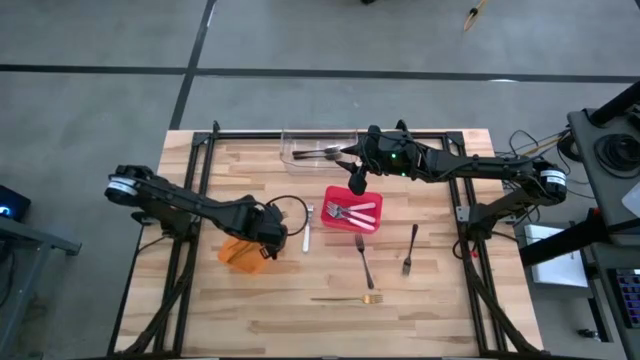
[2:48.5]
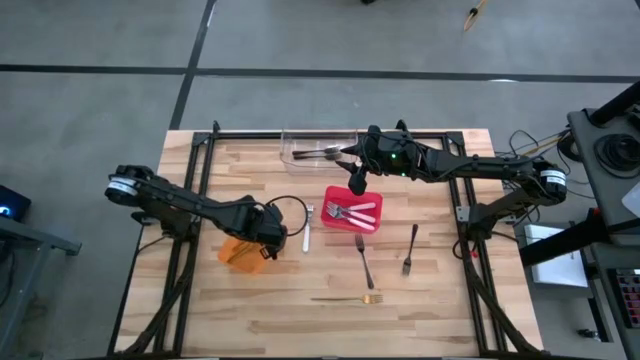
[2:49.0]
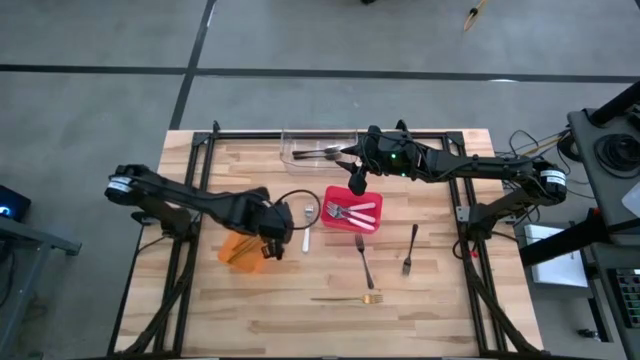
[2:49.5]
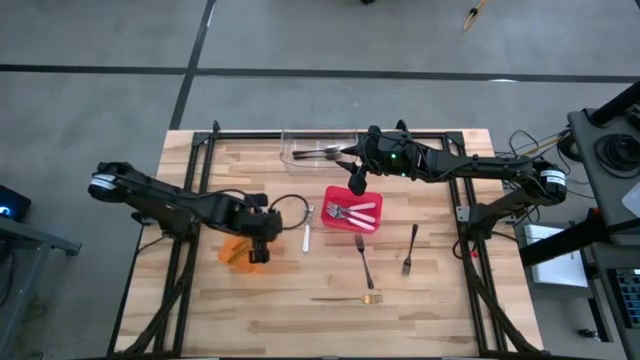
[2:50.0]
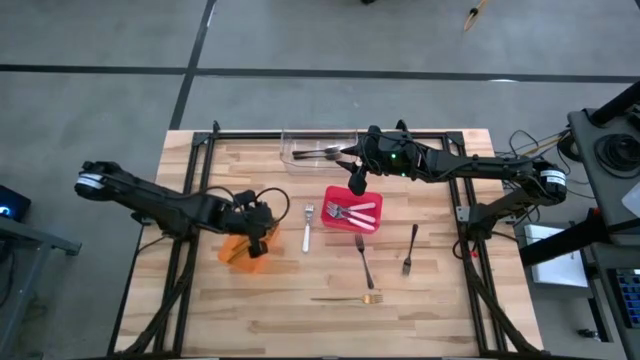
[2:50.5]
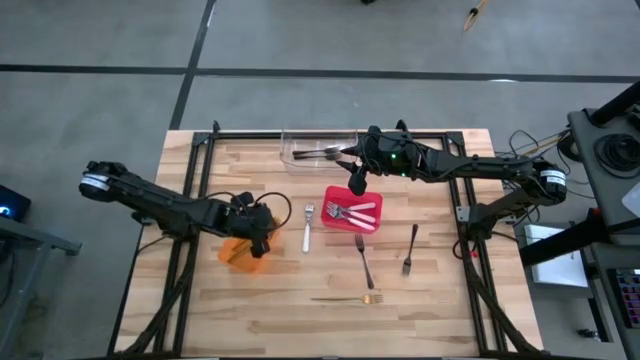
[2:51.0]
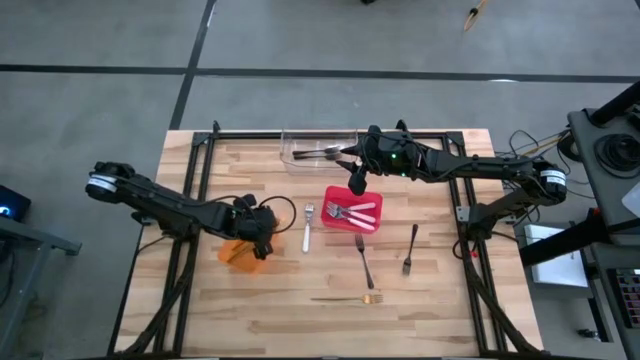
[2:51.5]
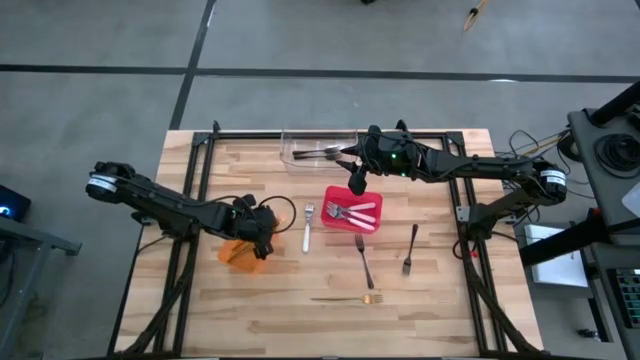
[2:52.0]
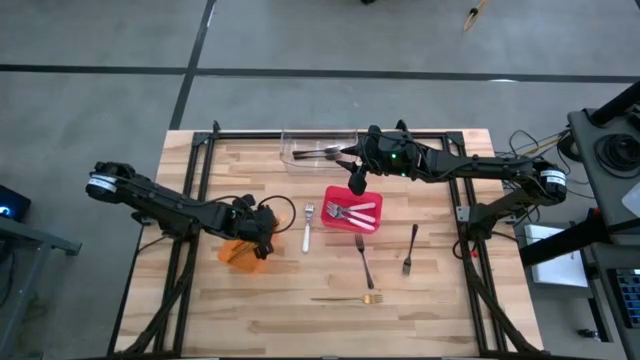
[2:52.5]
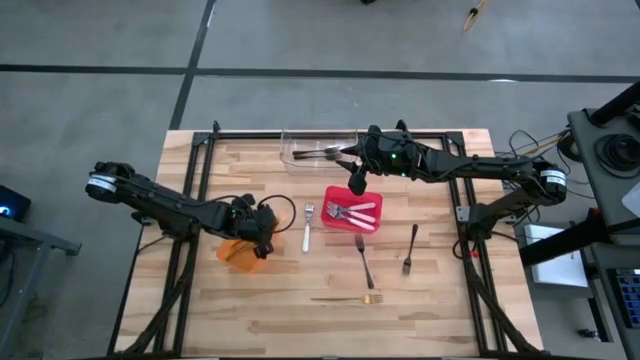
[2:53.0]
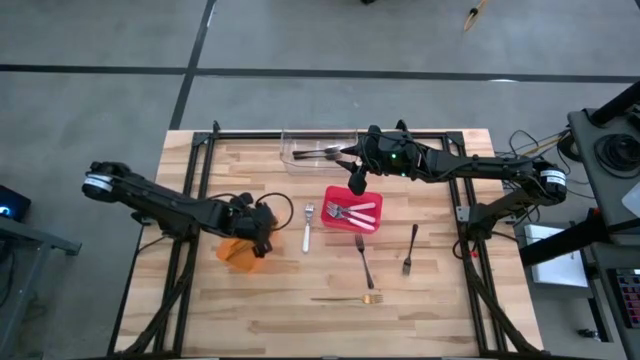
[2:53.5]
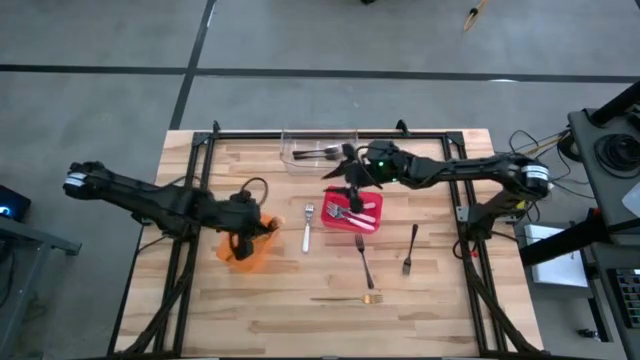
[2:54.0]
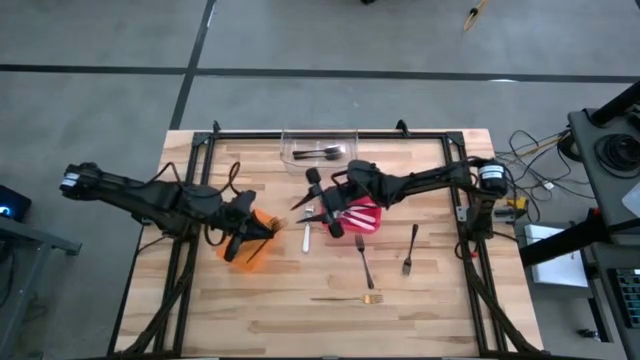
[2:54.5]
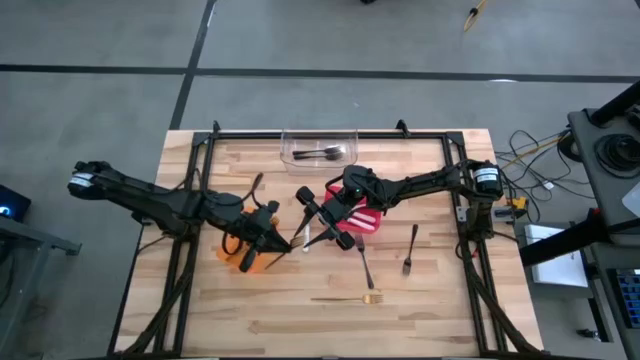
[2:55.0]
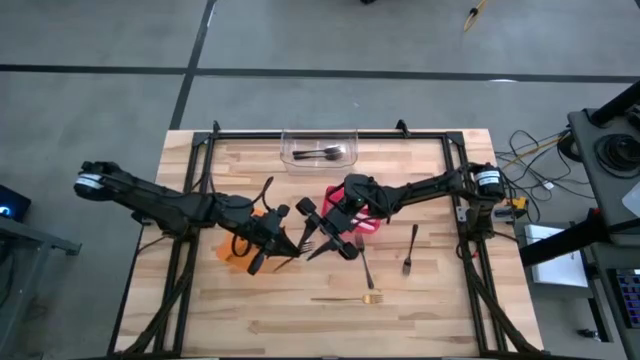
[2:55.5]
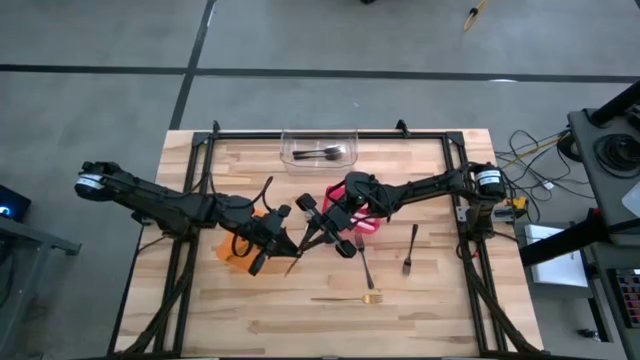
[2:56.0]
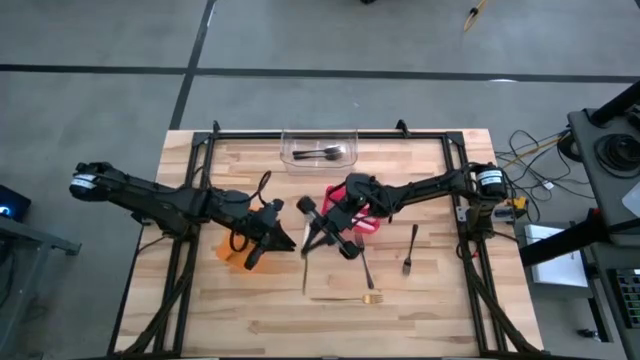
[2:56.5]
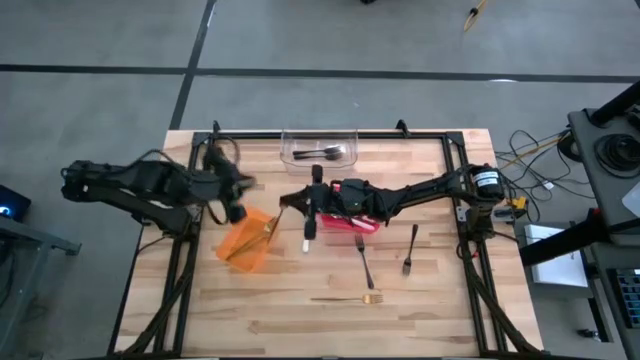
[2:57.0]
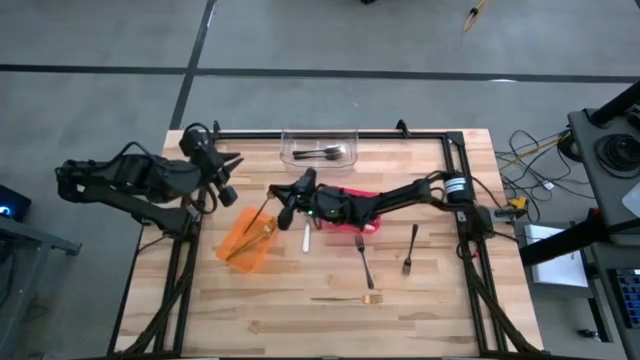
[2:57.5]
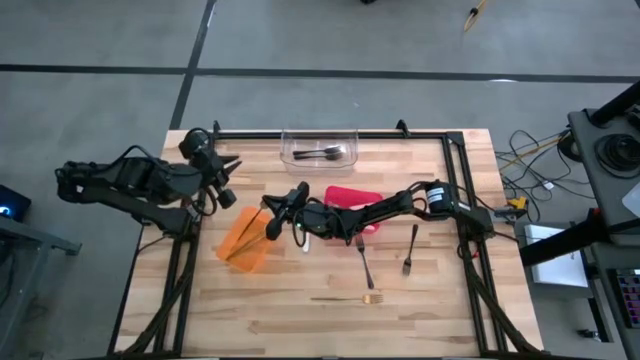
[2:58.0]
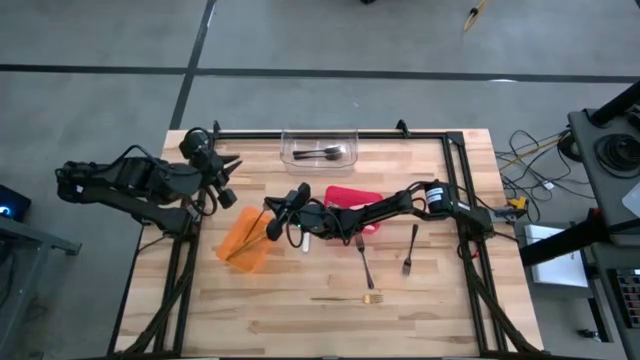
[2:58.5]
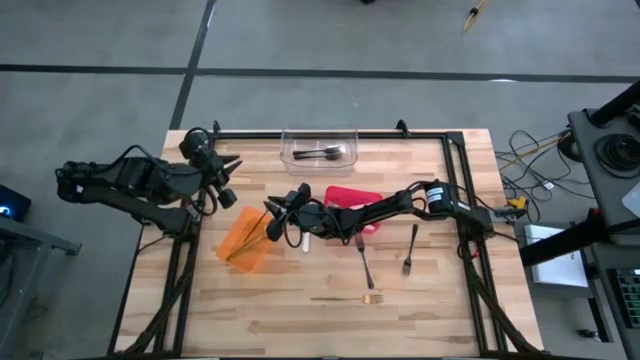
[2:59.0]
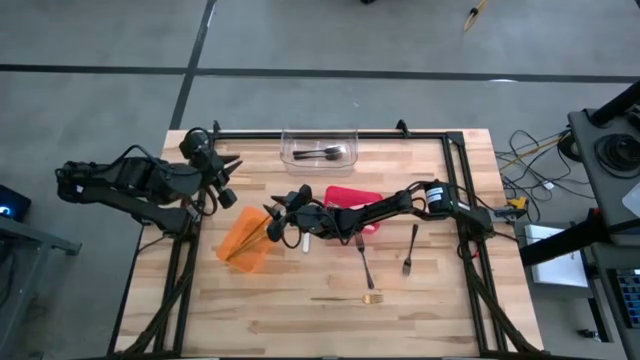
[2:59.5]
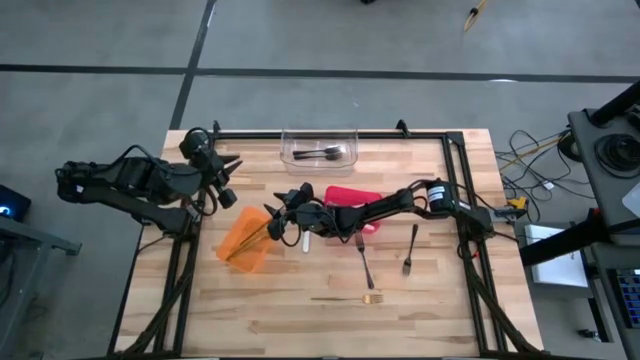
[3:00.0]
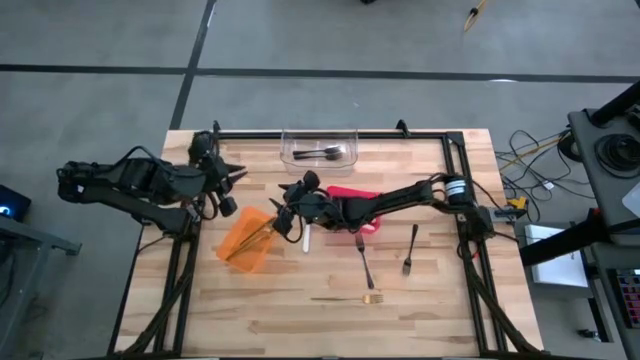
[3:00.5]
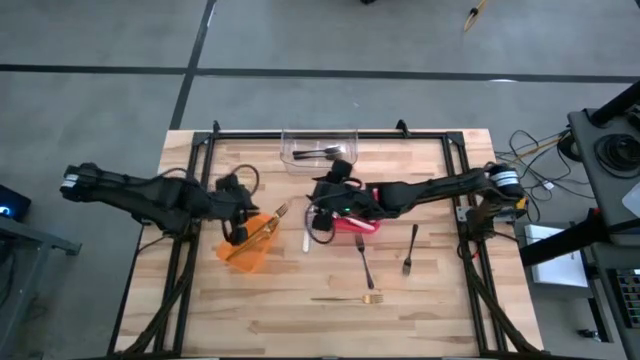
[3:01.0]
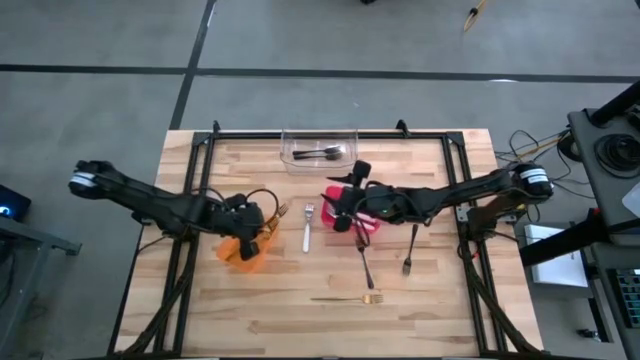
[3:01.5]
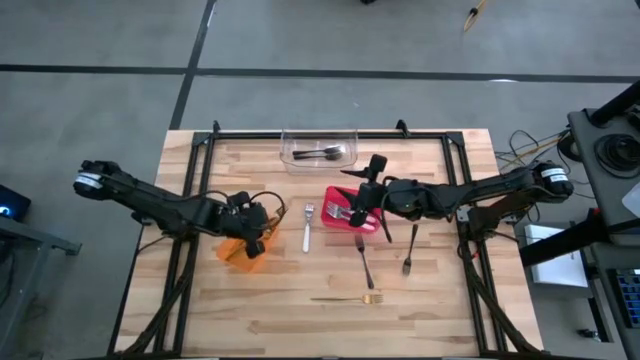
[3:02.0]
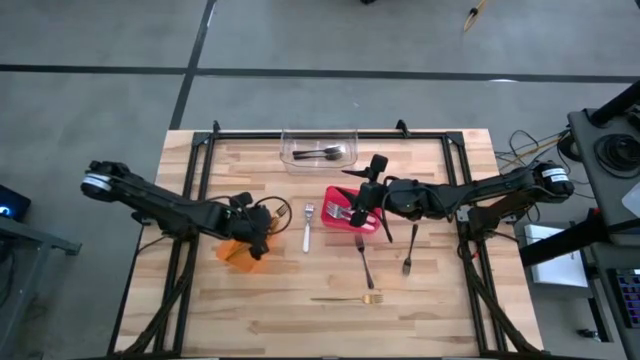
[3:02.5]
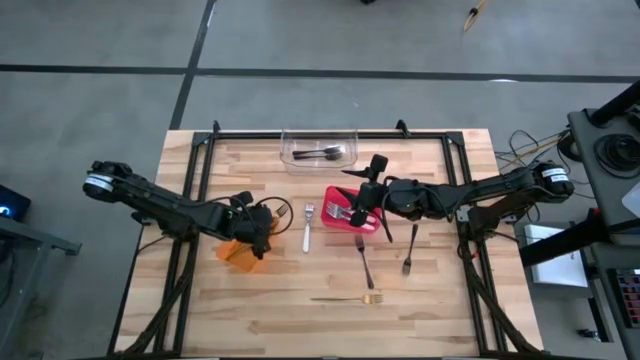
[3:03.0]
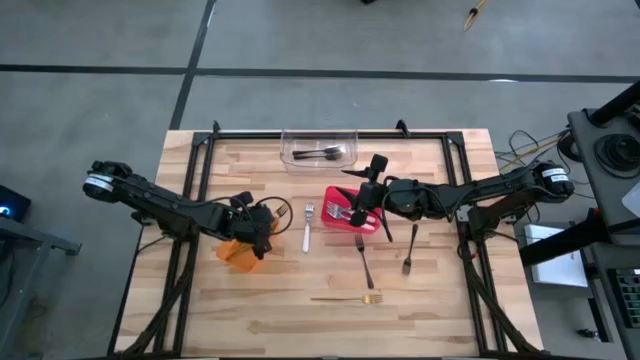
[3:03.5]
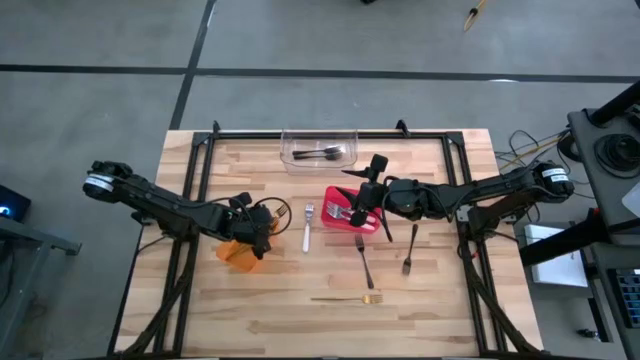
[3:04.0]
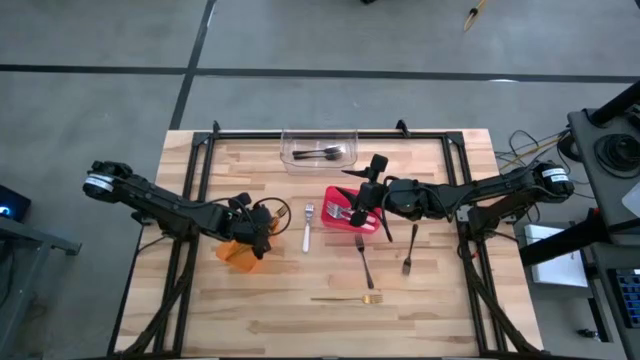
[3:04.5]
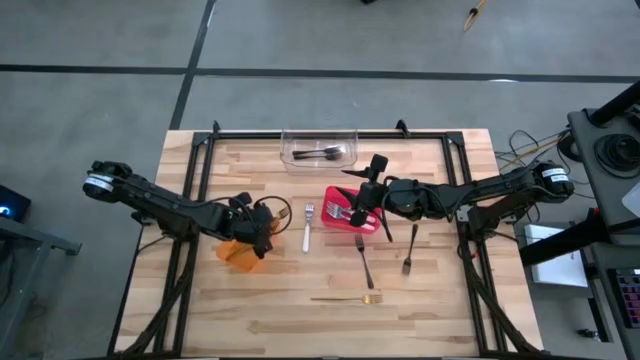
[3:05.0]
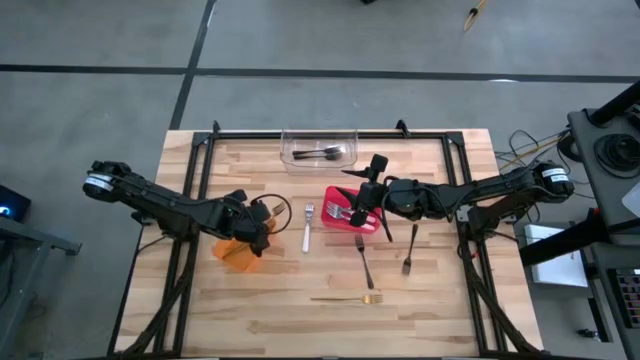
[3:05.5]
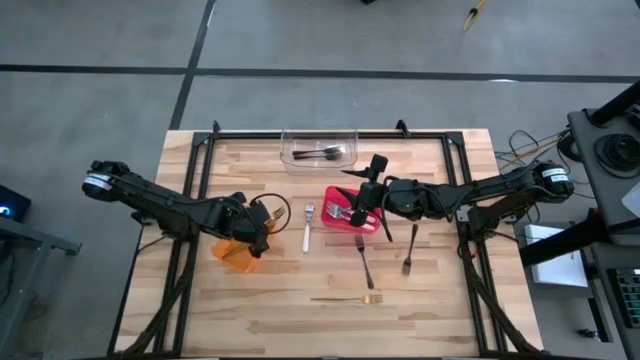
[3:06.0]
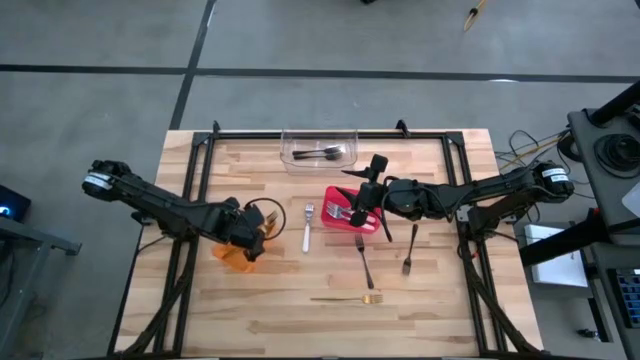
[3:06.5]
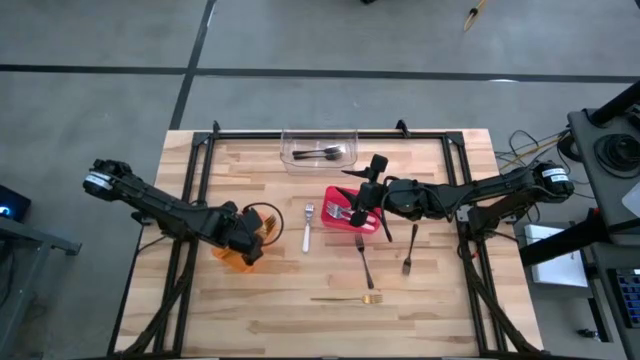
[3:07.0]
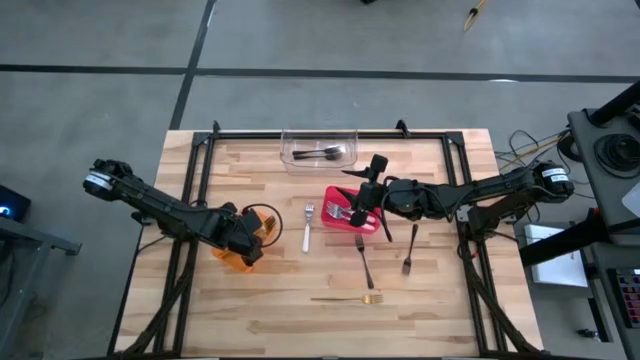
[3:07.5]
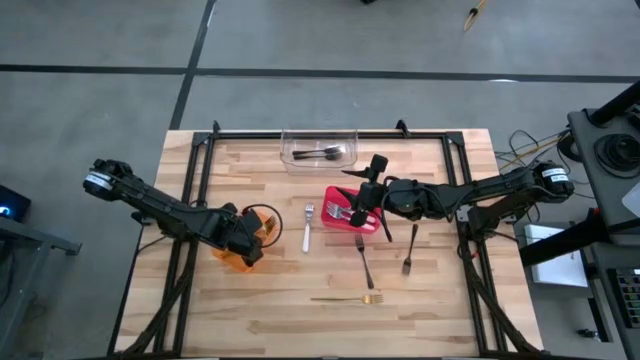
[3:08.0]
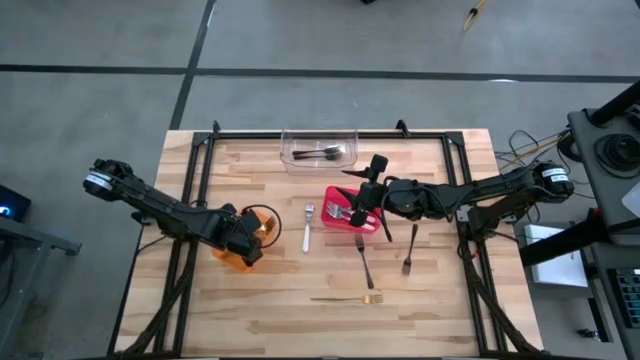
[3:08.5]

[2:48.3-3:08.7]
Task: Sort silverware by color (type)
Put the gold fork into the orange bin
